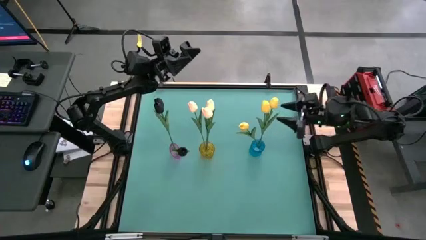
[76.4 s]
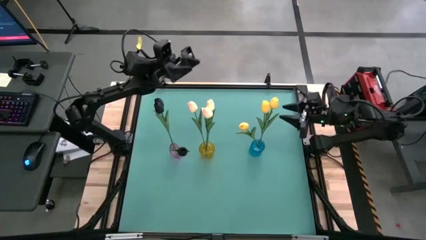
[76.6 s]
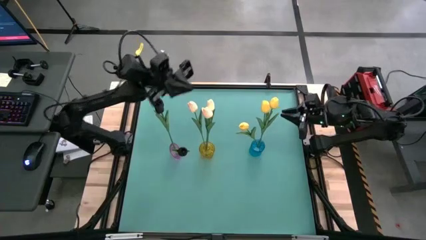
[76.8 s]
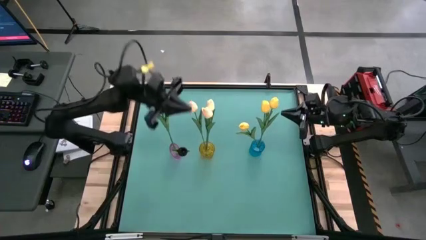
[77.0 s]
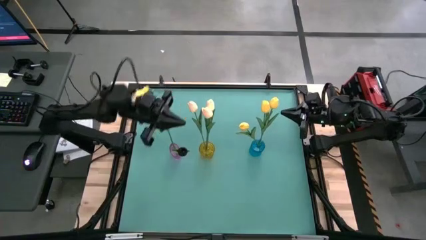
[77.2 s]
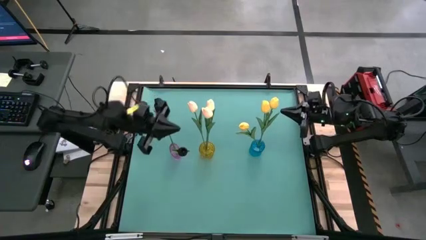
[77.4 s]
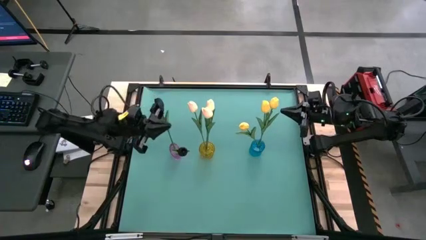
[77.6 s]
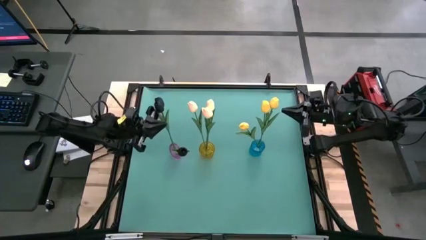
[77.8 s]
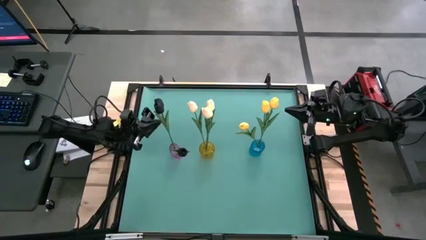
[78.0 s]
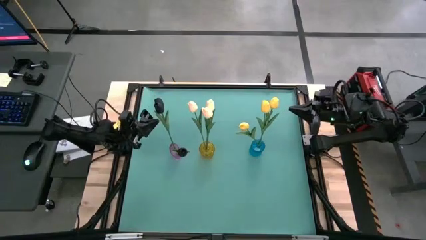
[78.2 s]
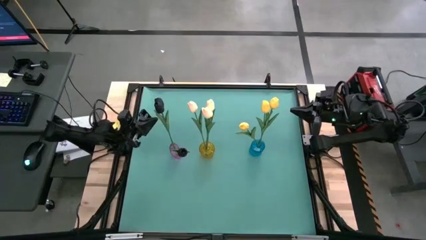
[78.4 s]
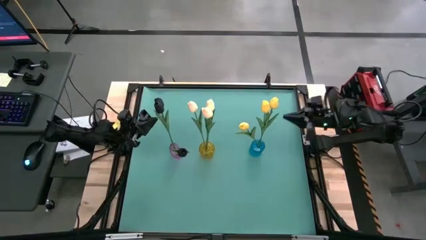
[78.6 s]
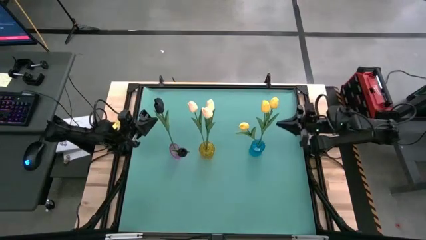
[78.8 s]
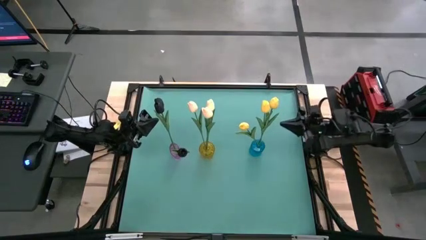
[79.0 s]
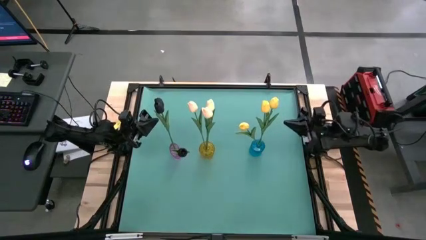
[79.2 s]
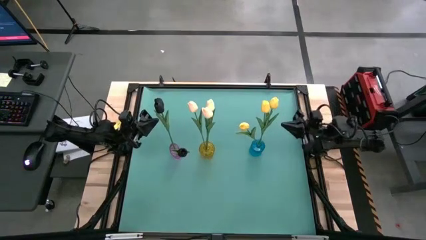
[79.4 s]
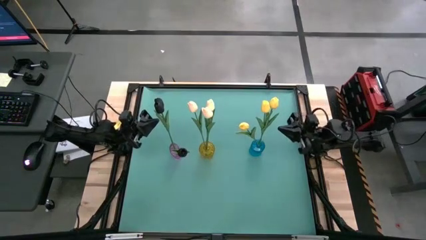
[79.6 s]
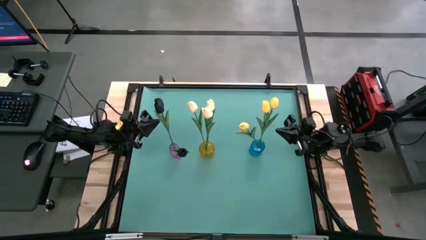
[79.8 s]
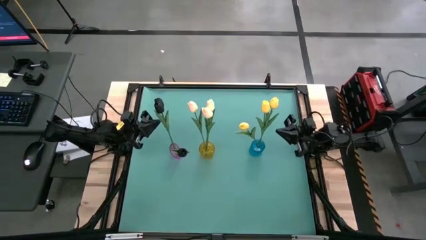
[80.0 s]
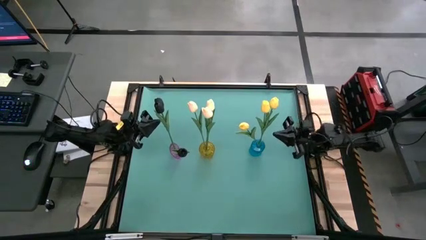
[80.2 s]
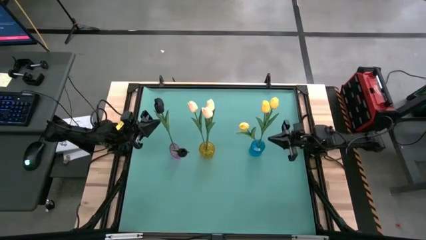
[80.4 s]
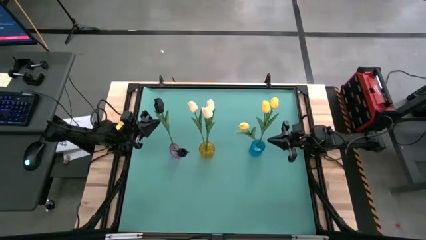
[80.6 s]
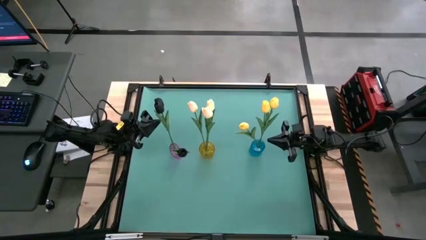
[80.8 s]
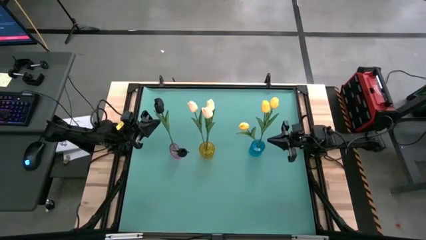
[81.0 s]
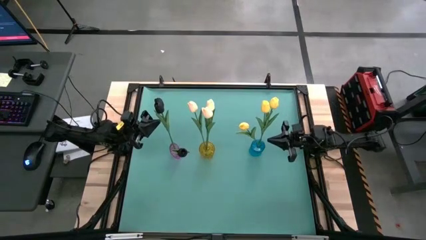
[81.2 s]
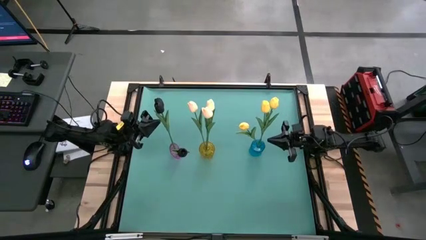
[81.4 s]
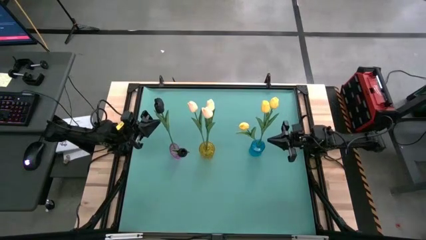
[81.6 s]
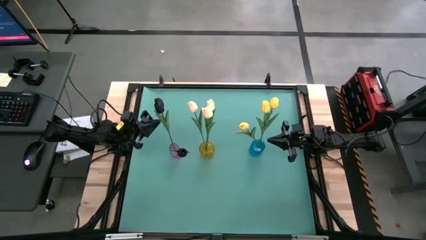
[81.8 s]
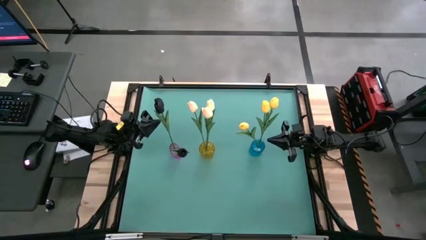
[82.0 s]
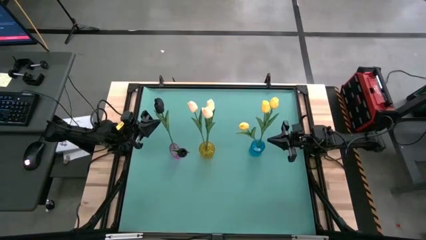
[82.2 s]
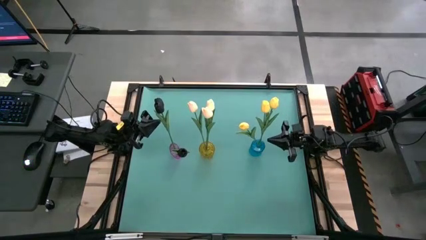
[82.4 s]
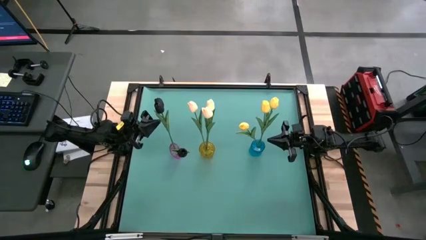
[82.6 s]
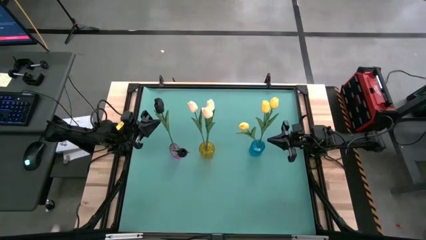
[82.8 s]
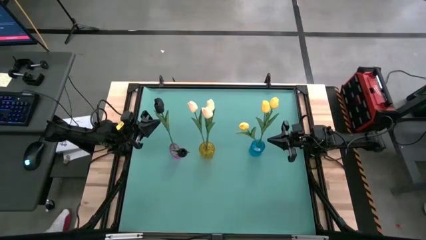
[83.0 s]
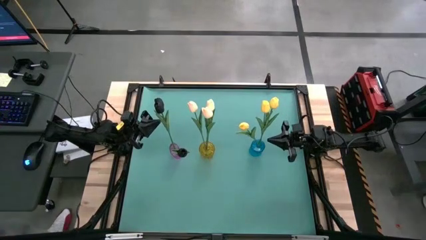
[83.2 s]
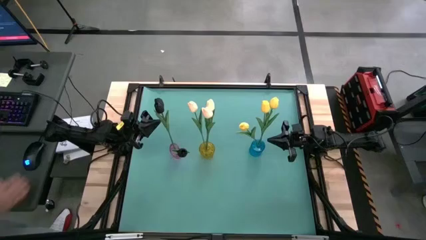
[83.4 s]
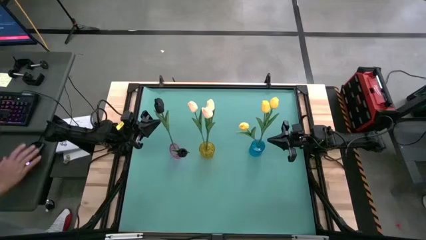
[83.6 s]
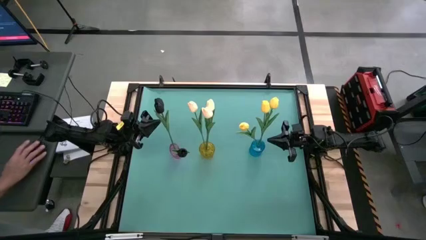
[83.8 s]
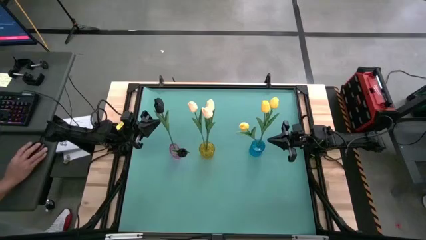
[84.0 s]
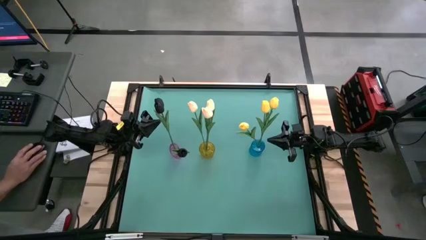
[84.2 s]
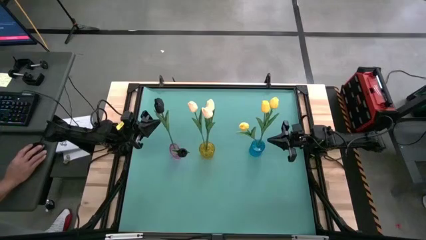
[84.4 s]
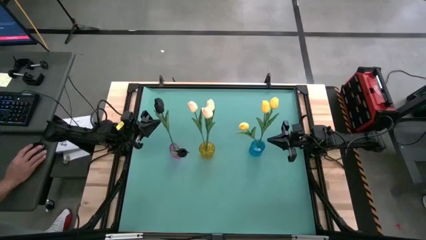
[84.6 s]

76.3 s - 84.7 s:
Task: Sort flowers into vase by color
Return to Home Position

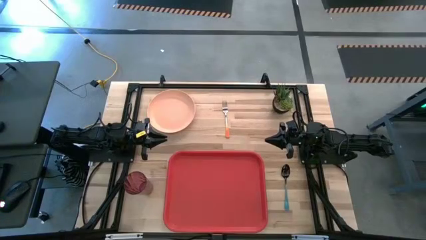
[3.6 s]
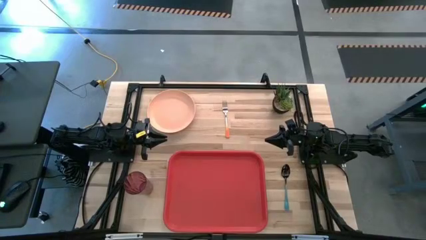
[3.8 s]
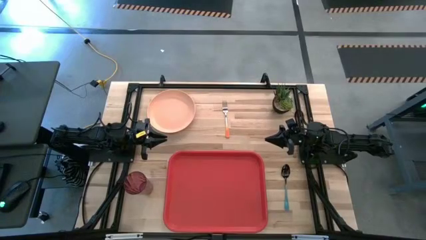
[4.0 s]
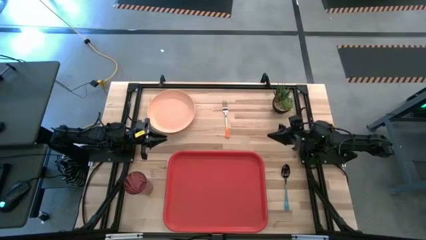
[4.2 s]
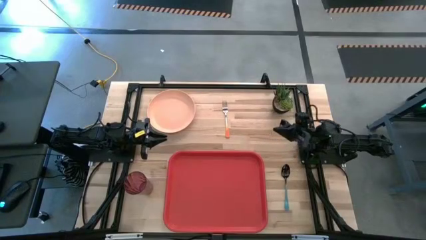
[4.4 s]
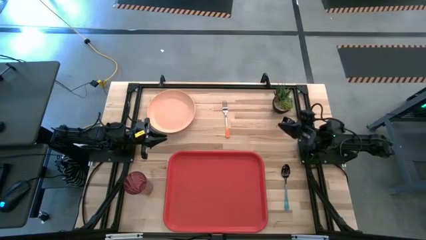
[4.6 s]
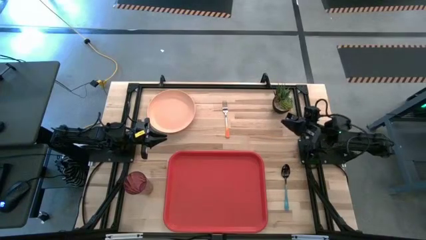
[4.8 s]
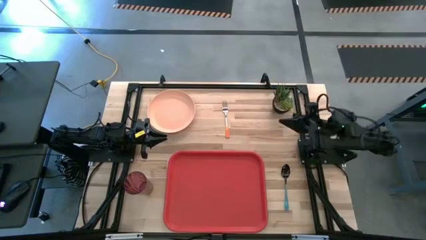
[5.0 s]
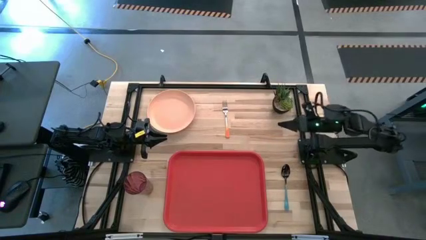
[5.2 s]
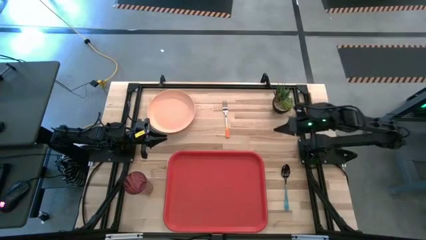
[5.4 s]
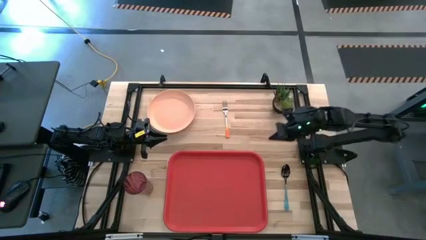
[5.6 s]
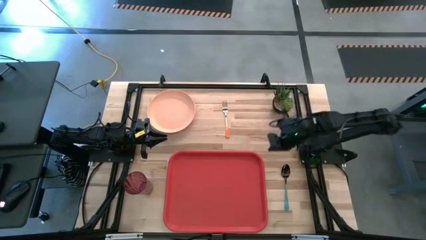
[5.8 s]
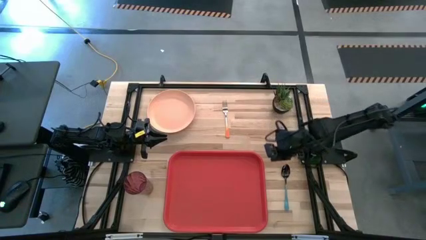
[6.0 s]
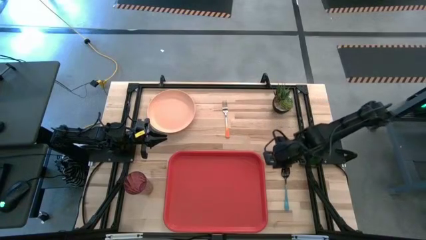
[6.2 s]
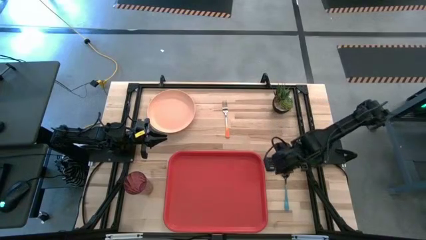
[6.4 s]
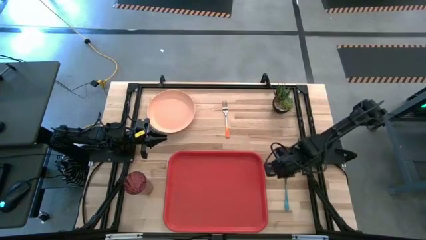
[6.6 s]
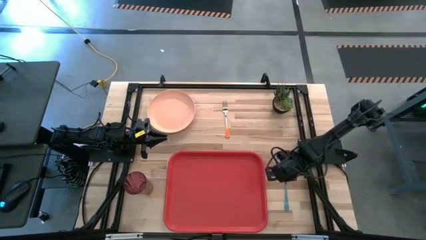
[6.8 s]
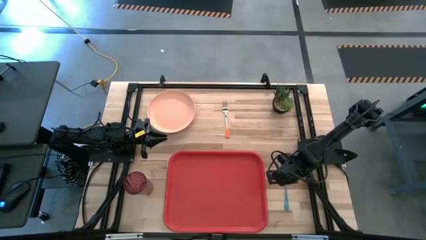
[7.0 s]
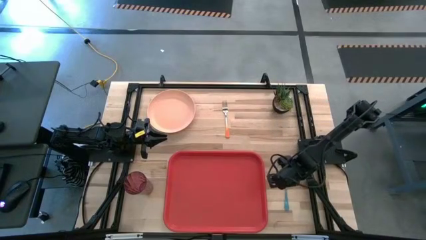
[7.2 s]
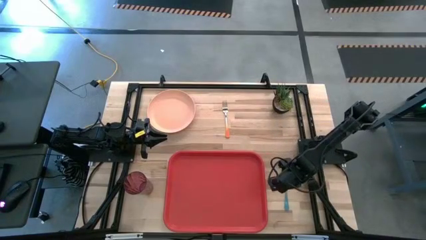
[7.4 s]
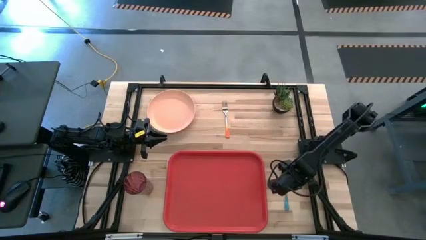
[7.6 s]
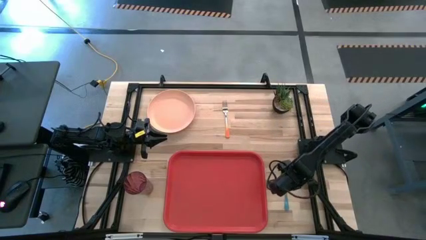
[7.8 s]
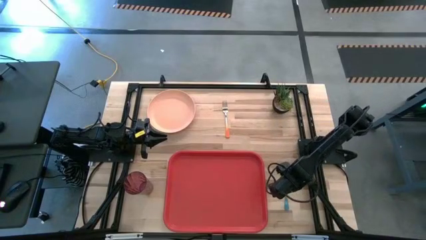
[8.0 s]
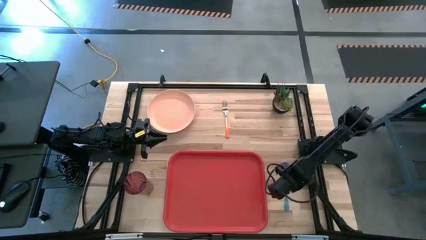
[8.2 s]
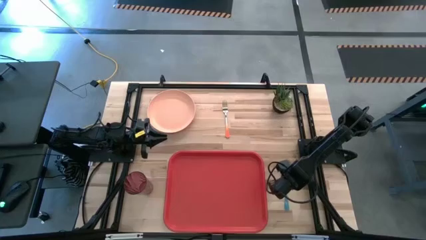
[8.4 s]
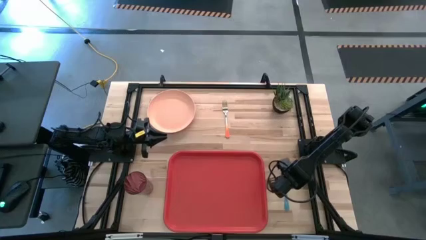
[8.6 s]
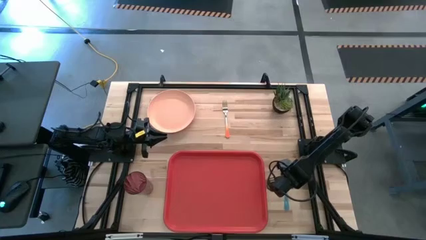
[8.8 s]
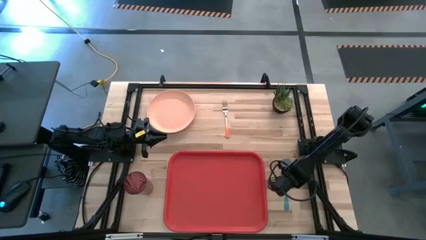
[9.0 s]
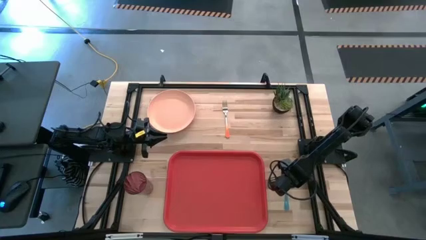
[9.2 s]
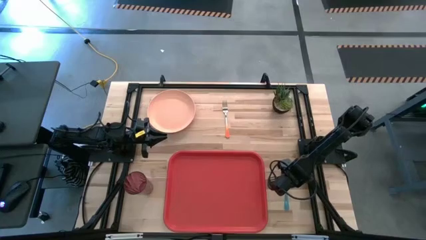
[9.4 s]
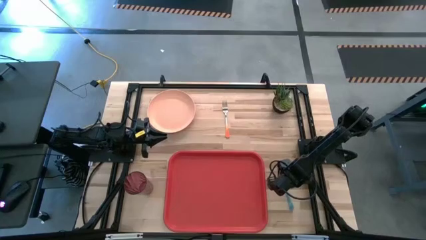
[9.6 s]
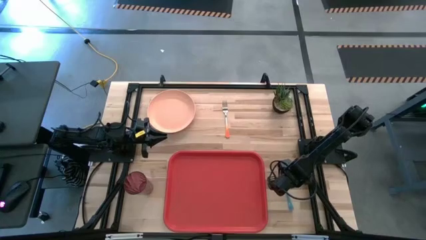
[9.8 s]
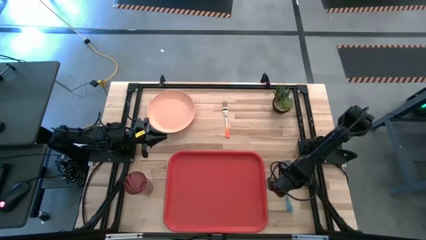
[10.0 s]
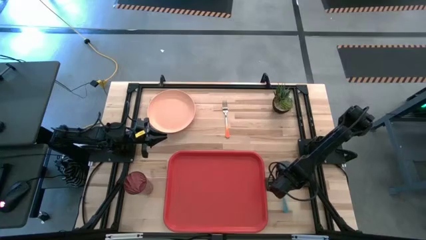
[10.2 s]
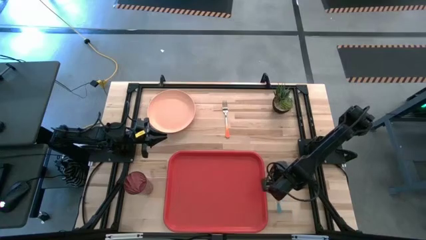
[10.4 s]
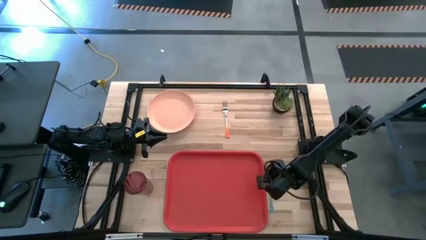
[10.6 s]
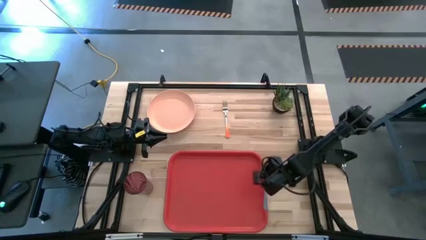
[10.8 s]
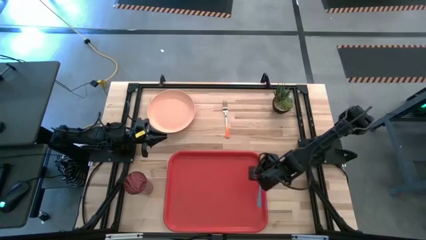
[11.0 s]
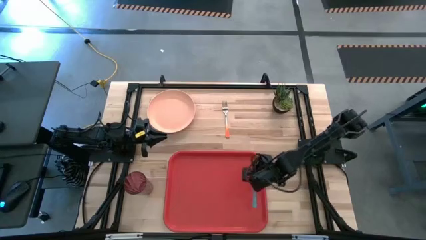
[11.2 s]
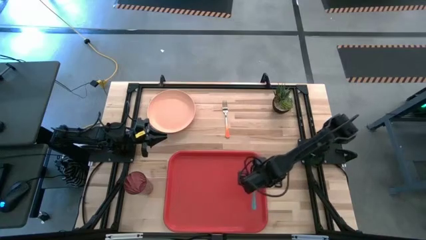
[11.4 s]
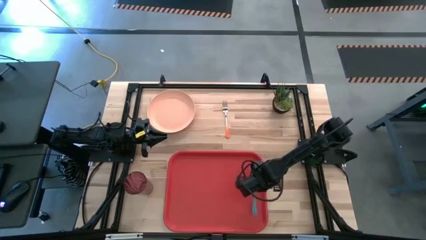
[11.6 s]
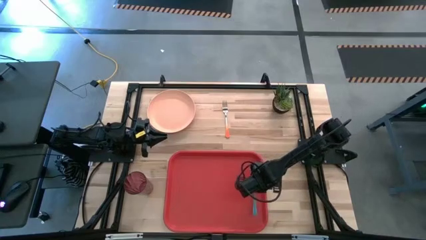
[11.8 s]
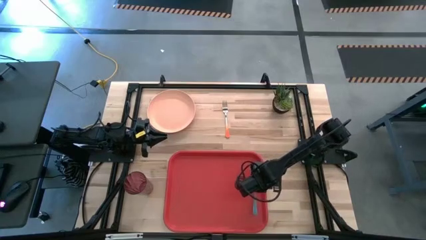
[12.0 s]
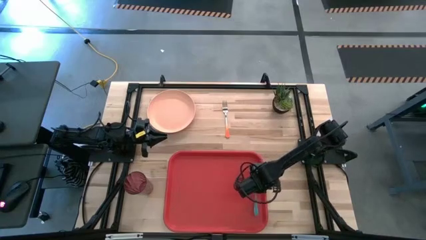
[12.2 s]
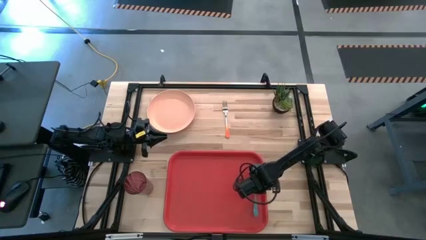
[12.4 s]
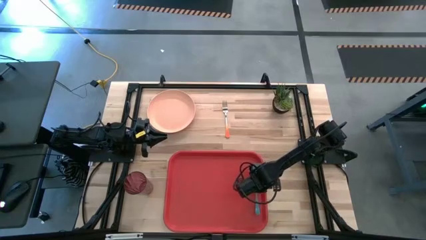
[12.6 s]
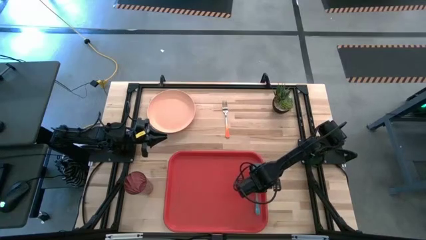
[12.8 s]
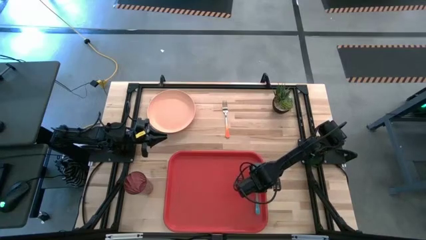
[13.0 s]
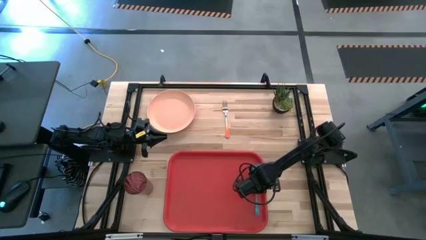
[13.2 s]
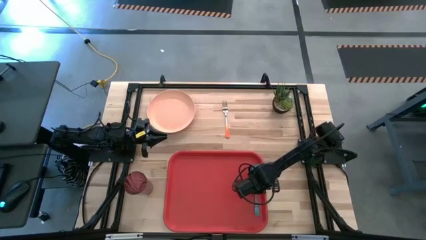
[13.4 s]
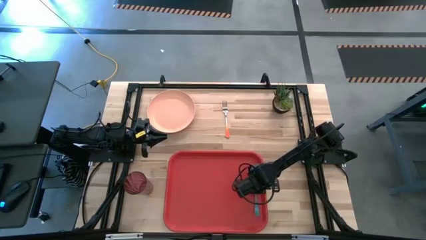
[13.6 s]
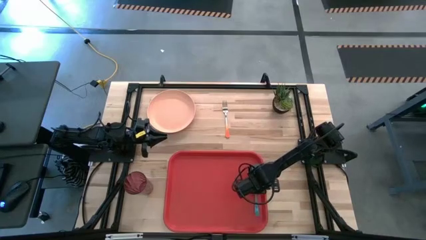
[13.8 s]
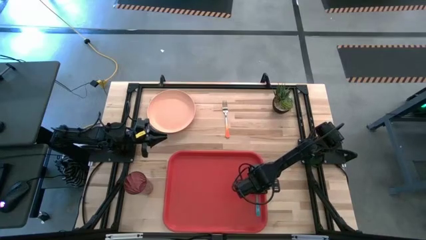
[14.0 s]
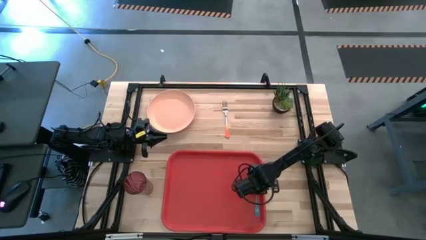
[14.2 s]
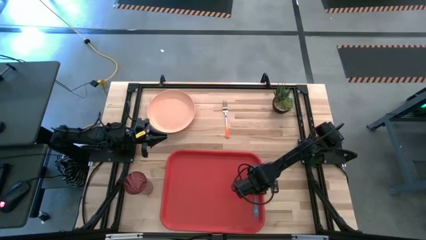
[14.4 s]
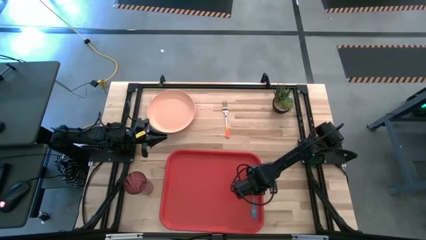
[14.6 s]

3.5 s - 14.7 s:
Task: Pick and place plate/cup/fork/spoon on tray
Put the blue spoon on the red serving tray
